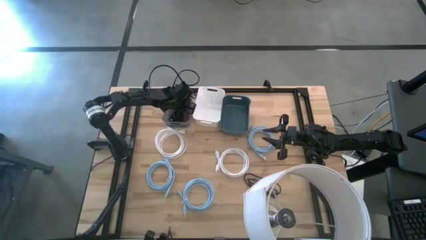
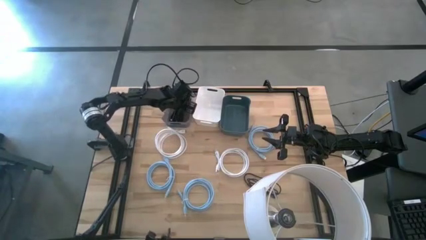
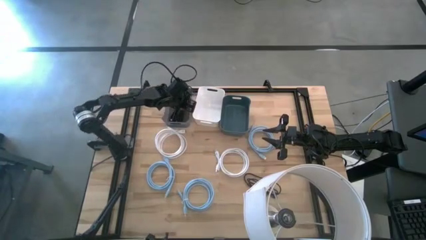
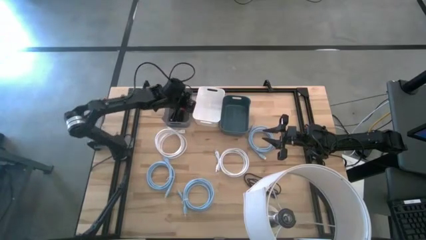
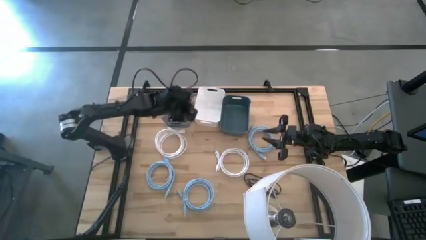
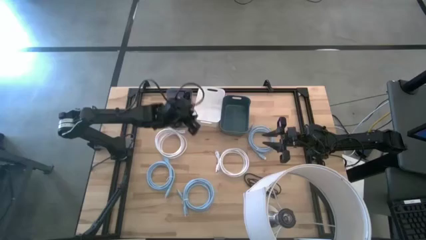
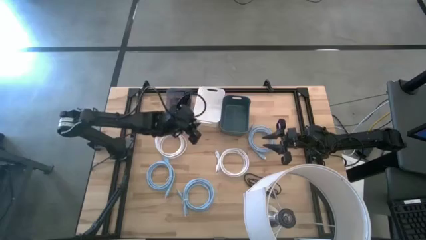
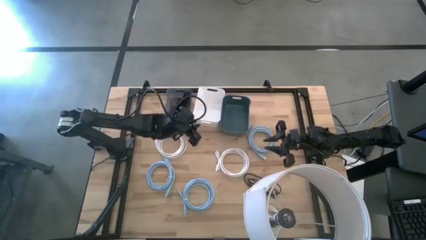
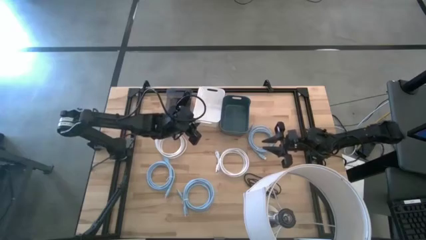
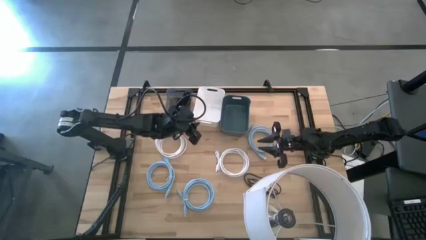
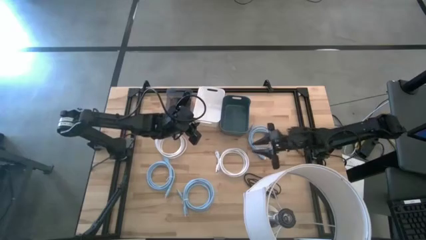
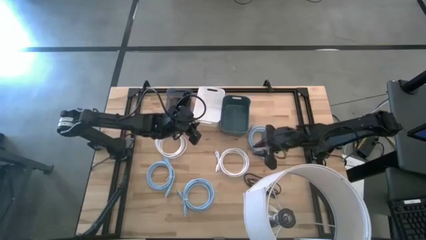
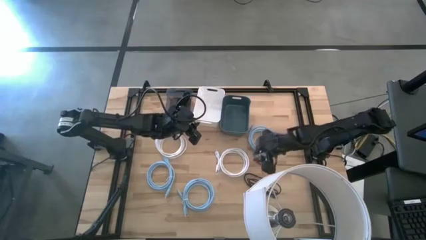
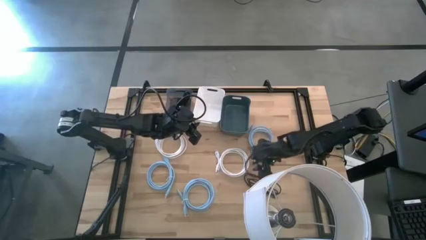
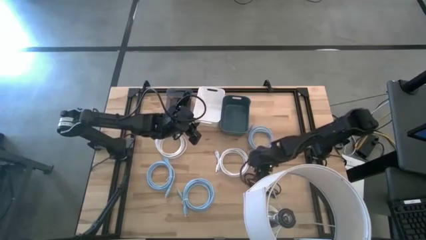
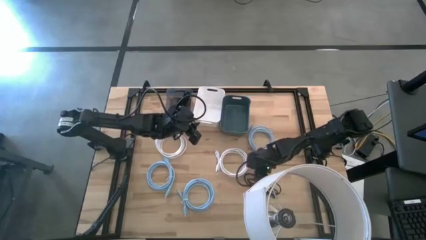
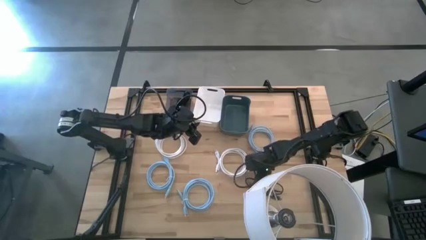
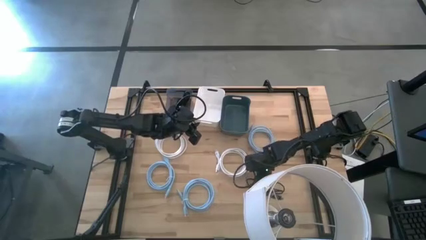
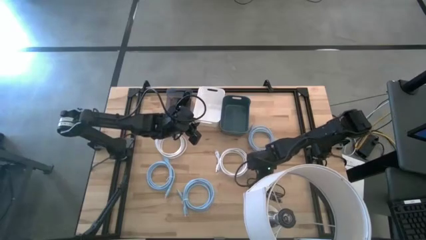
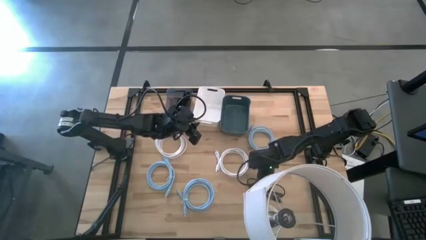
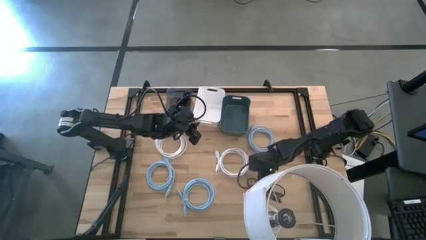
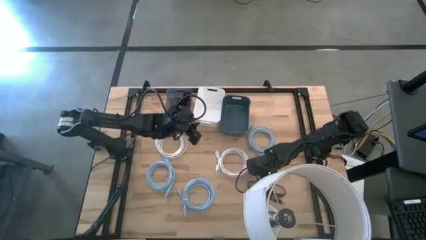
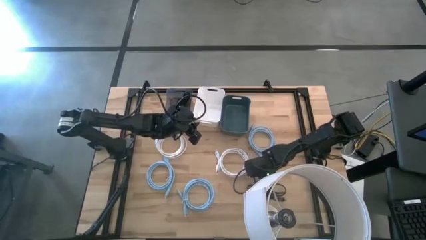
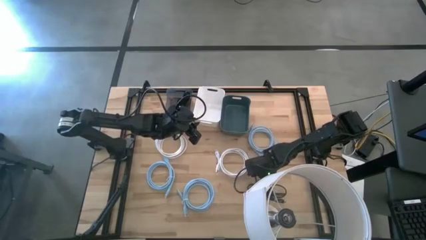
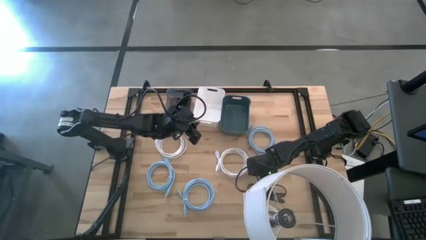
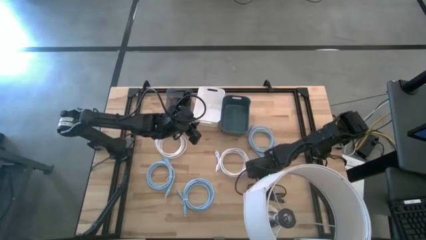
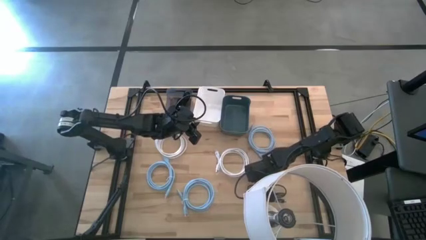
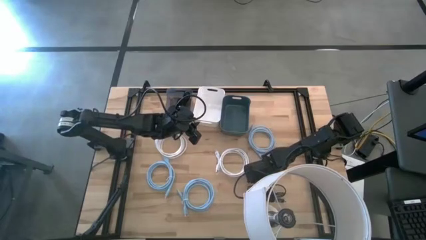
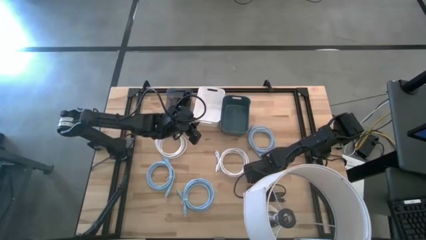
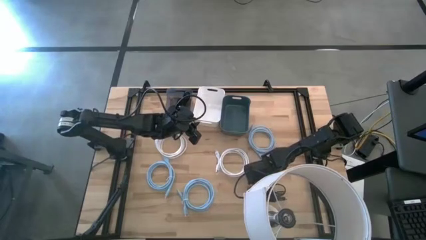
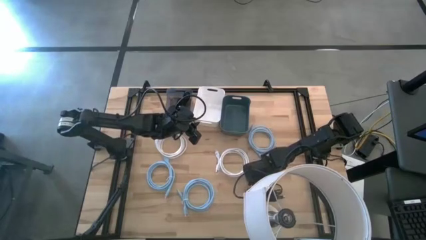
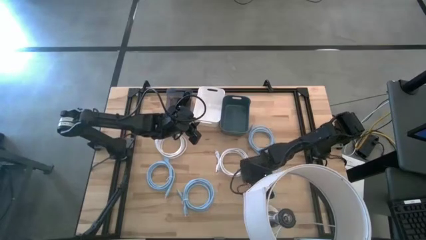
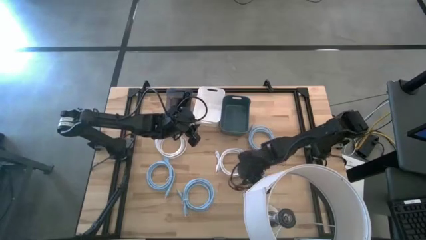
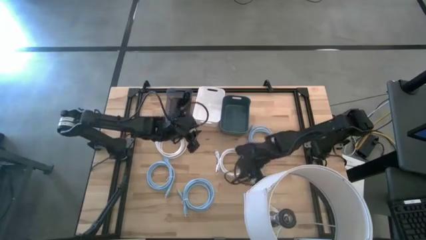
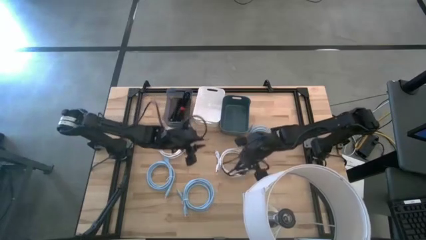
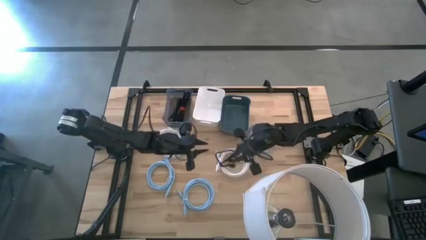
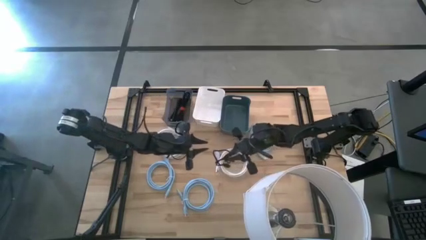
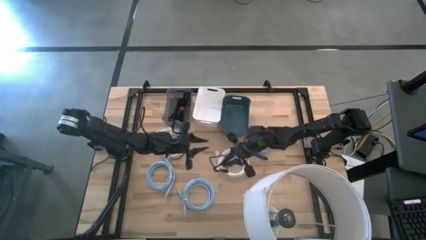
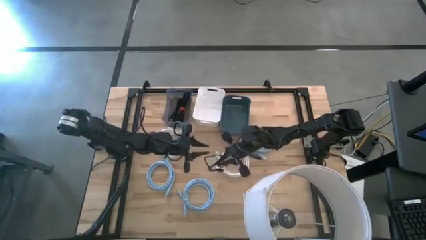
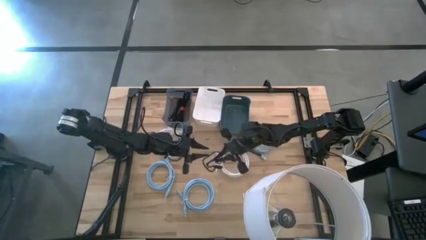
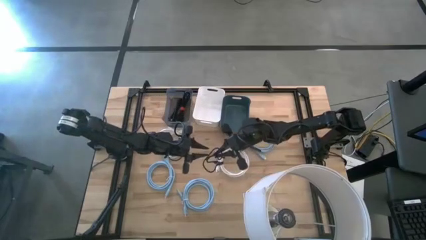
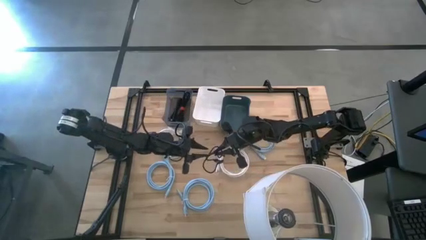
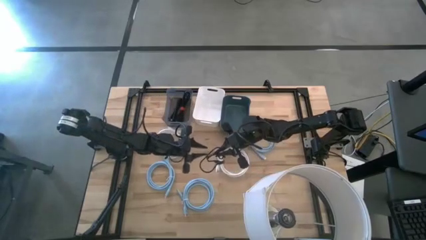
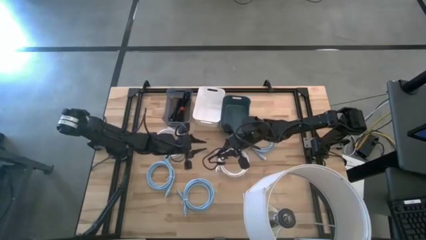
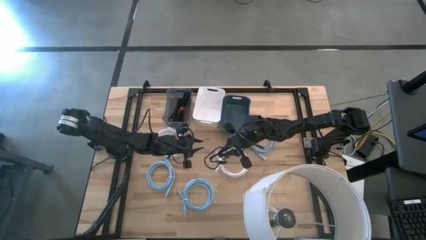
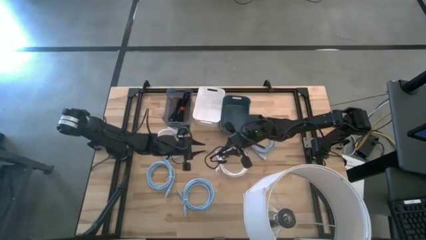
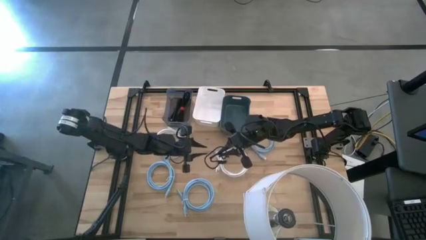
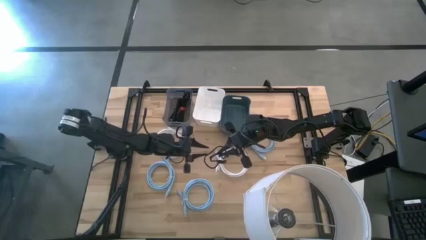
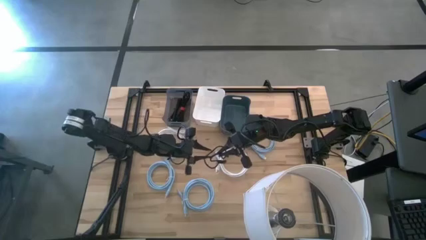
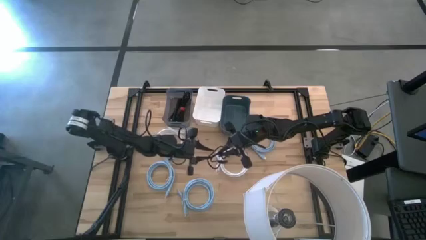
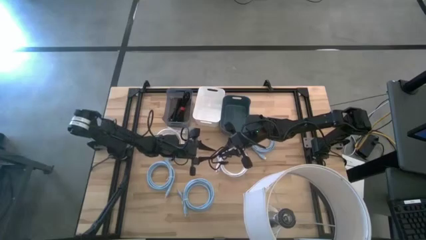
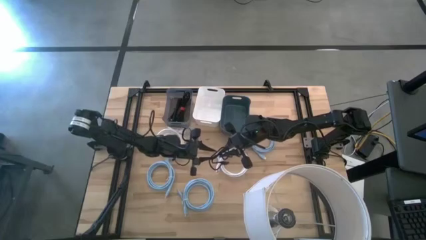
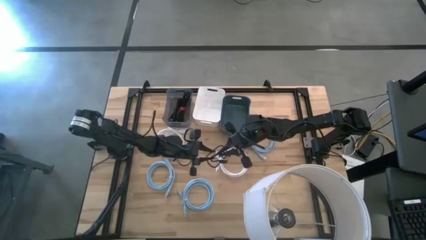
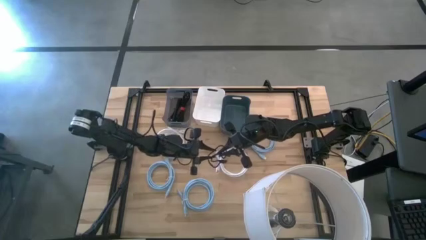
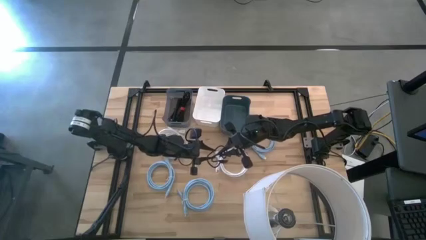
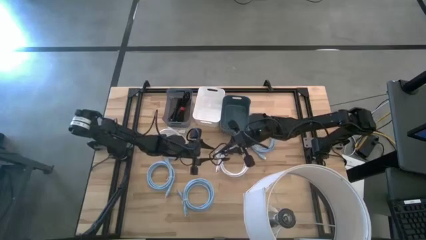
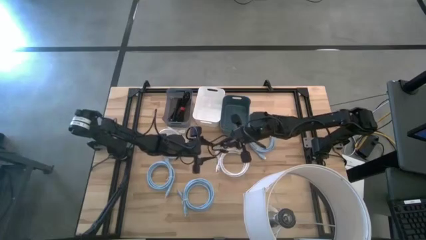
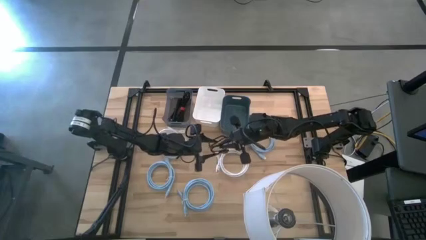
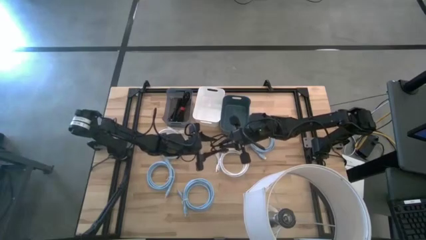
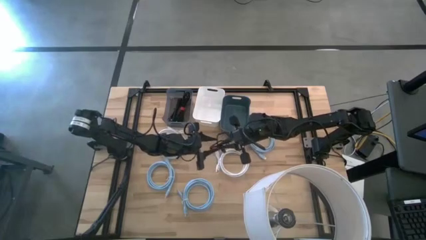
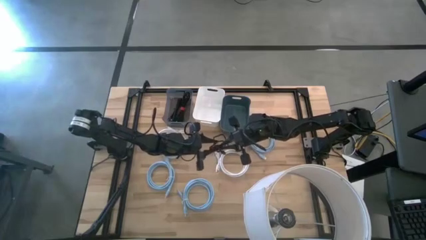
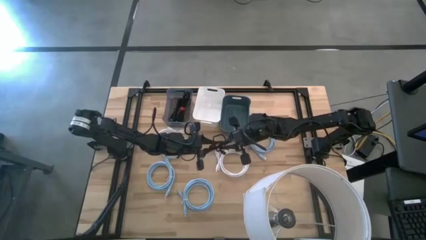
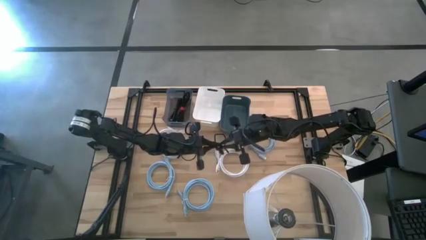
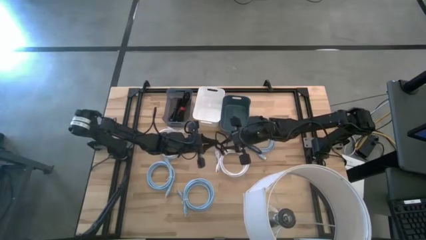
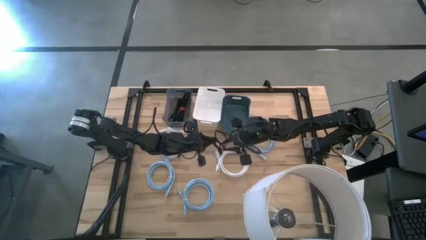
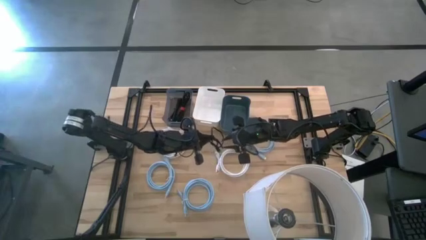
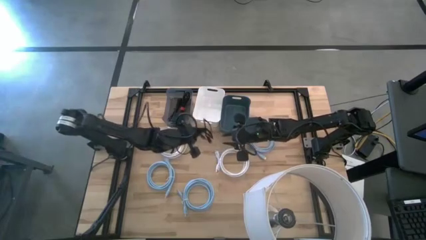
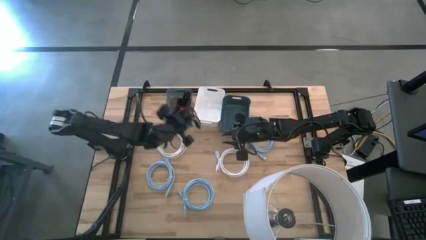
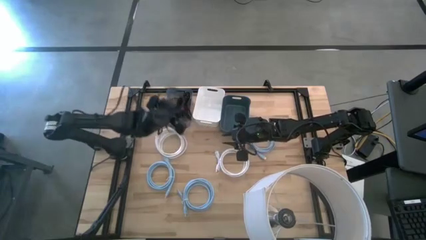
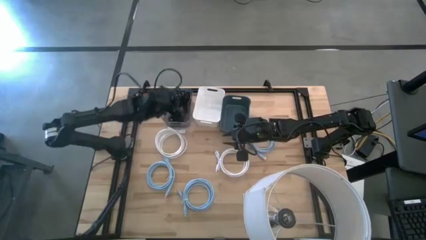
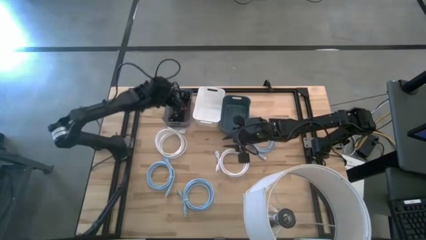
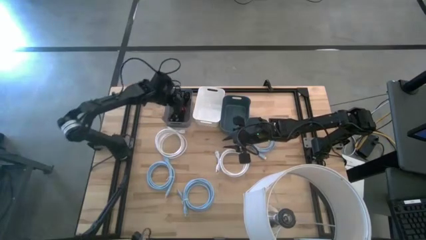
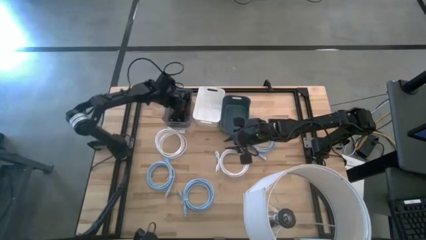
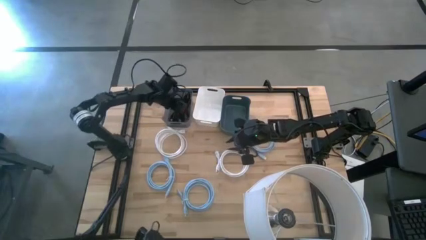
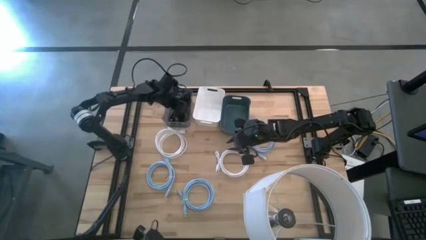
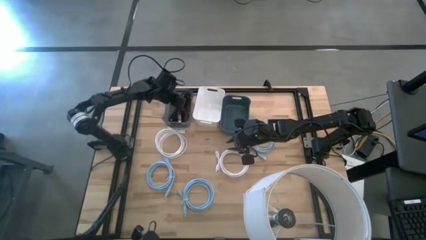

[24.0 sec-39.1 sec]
Task: Pick & Place USB Port
Put the black USB cable into the black bin
